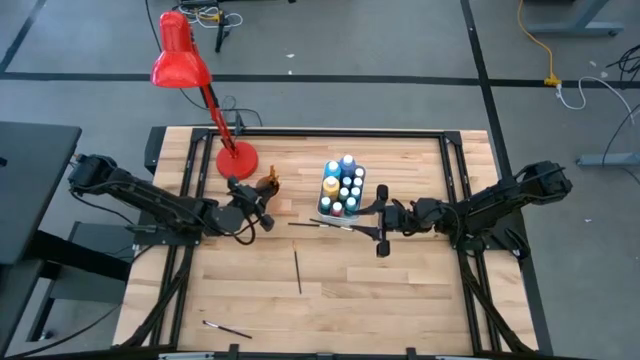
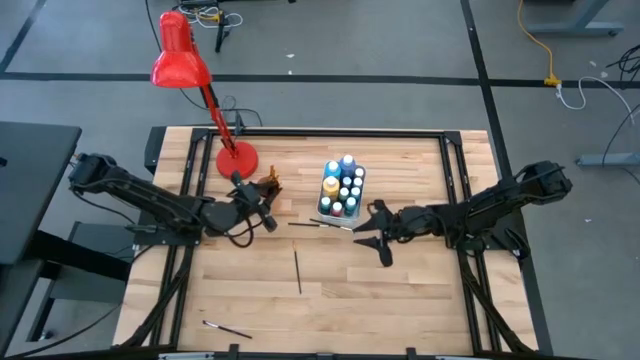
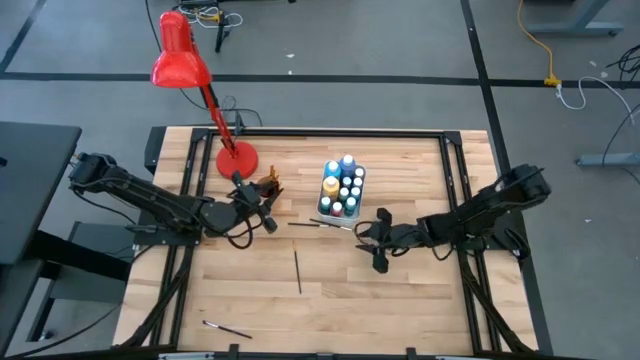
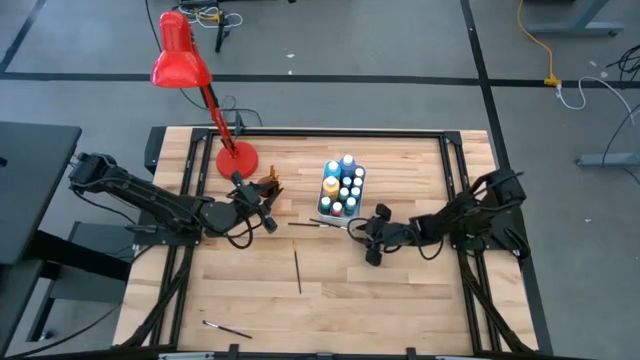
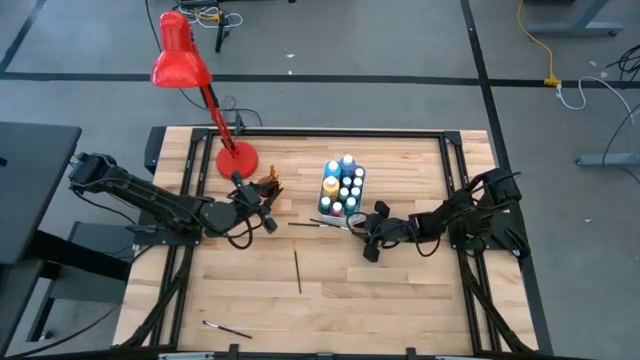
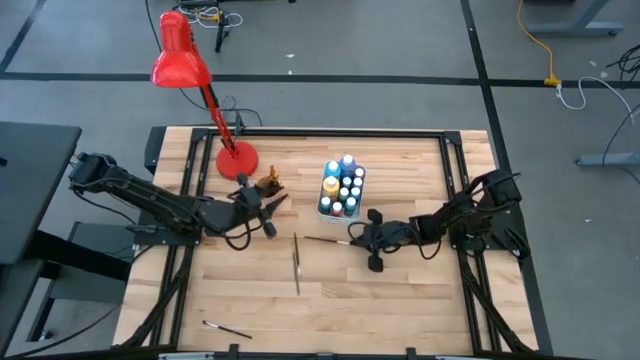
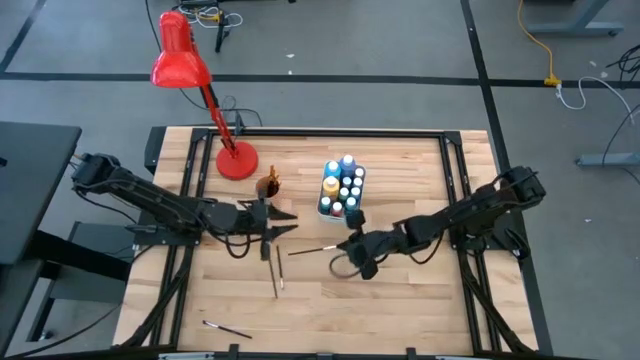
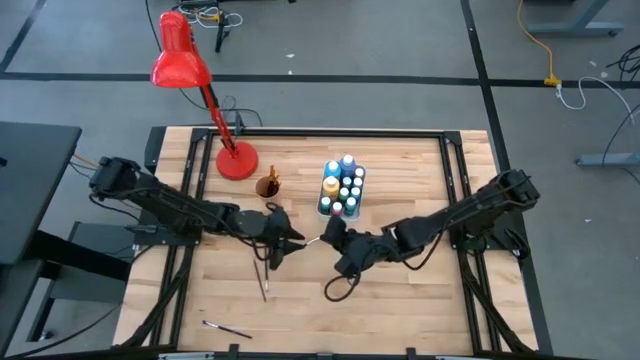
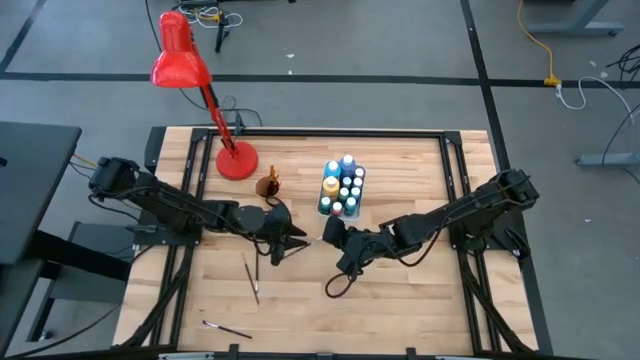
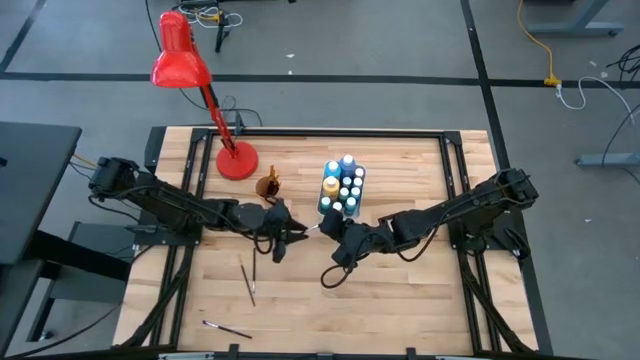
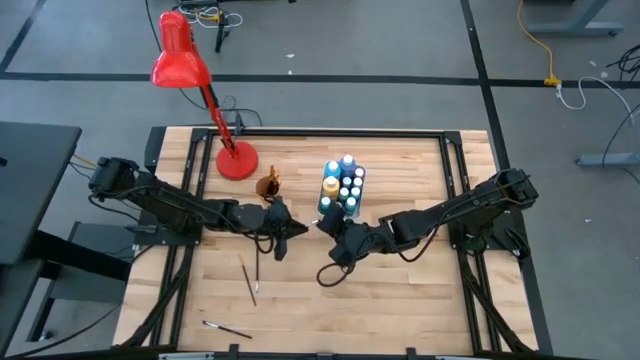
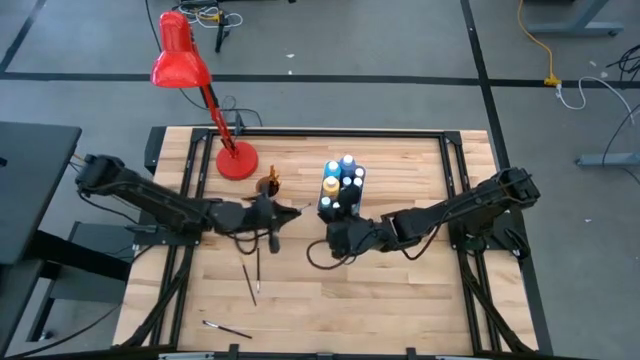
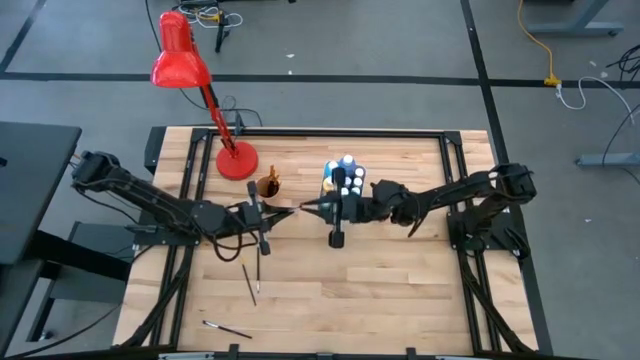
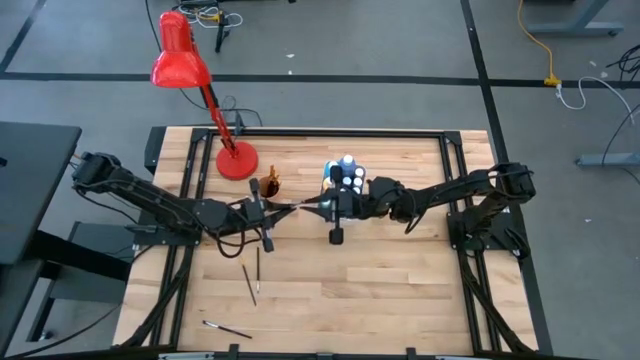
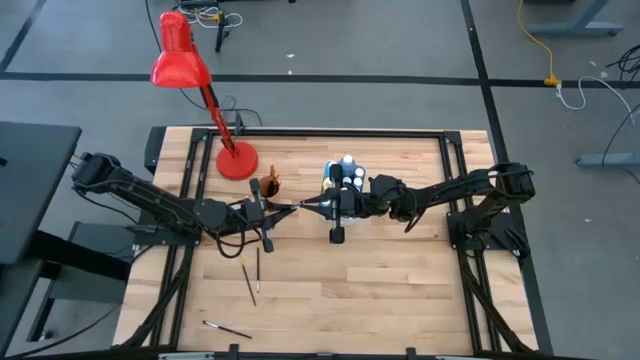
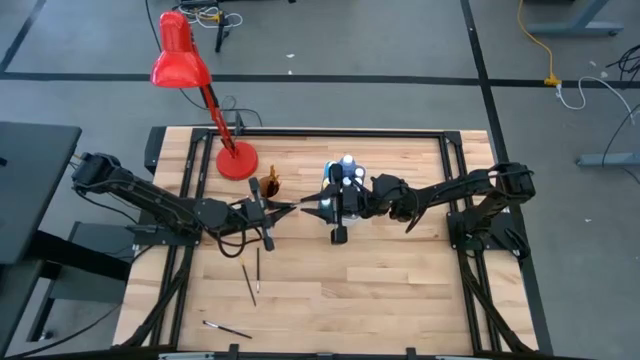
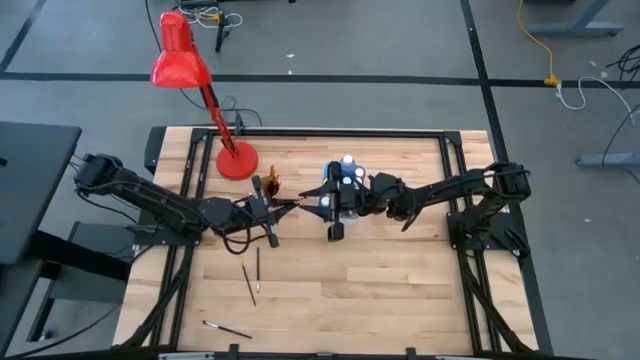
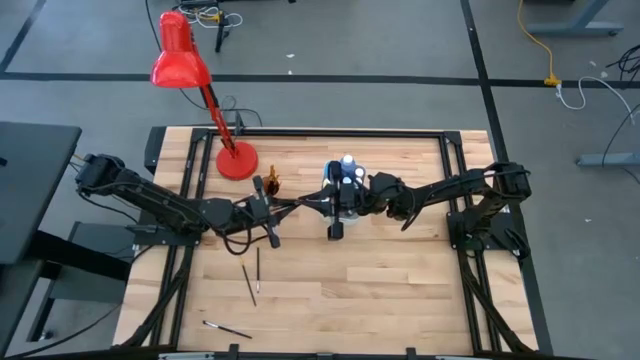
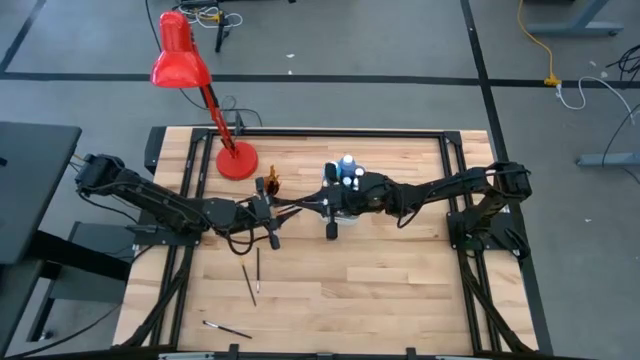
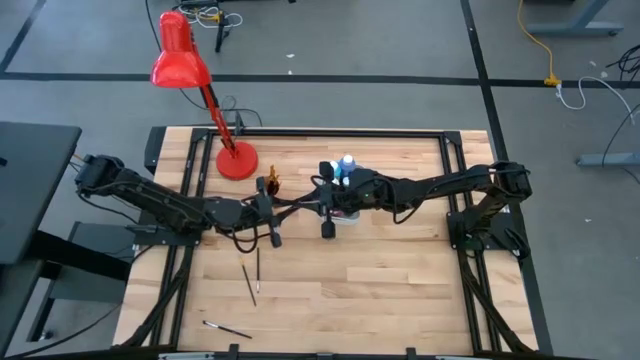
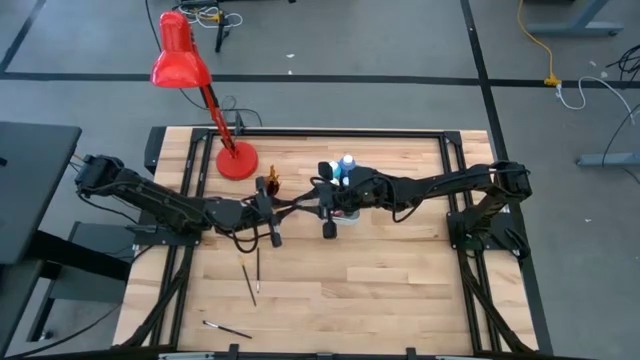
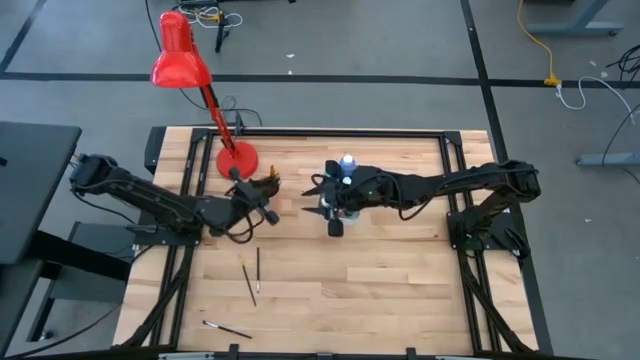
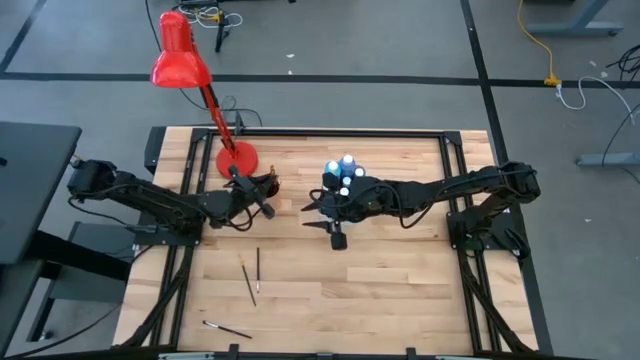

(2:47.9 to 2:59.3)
Task: Pick & Place Paint Supplies
Put the white paint brush into the orange cup

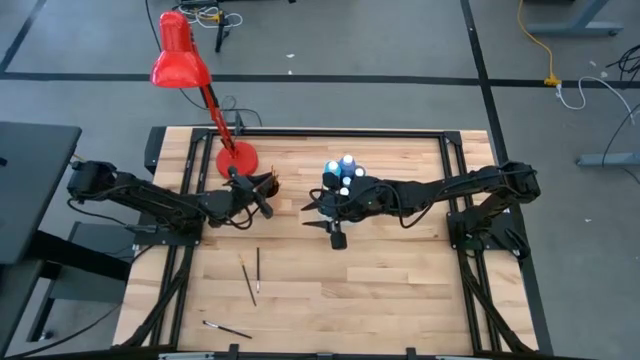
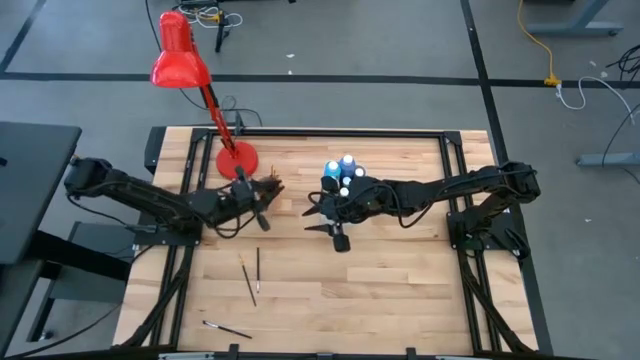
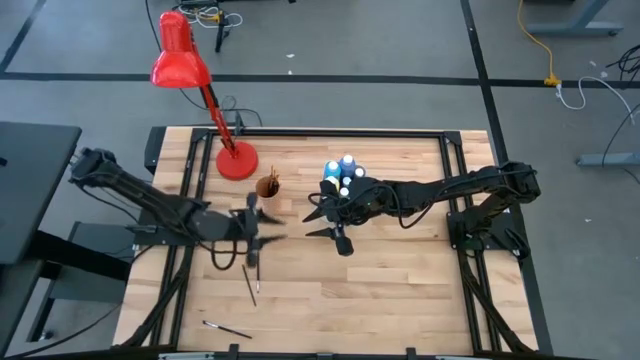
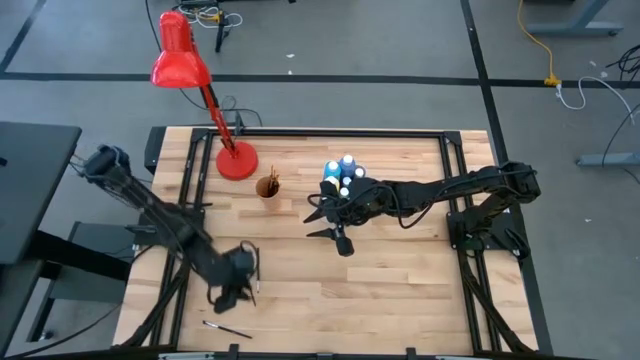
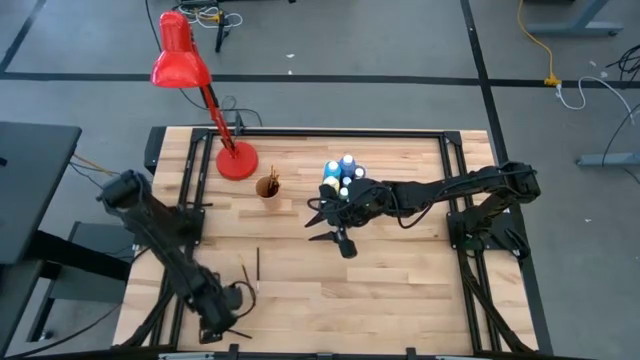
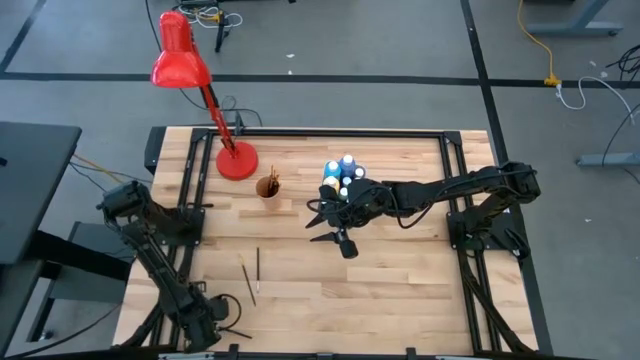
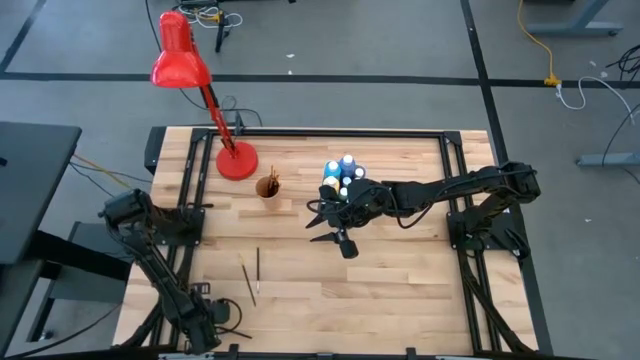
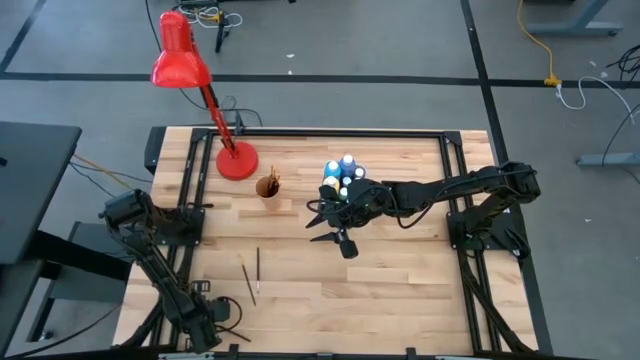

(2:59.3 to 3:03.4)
Put the white paint brush into the orange cup

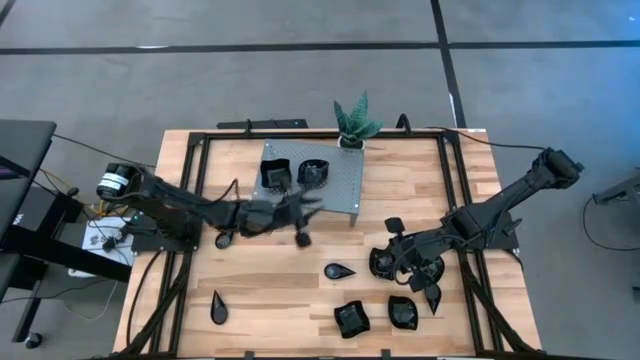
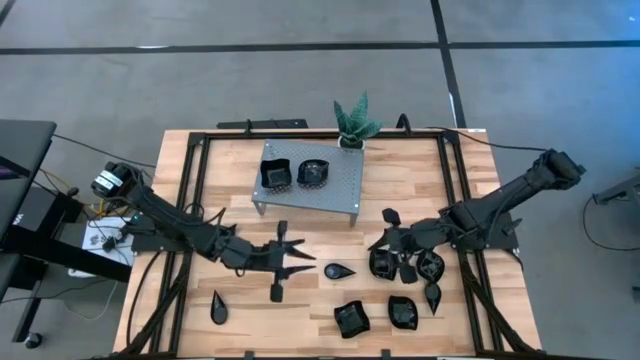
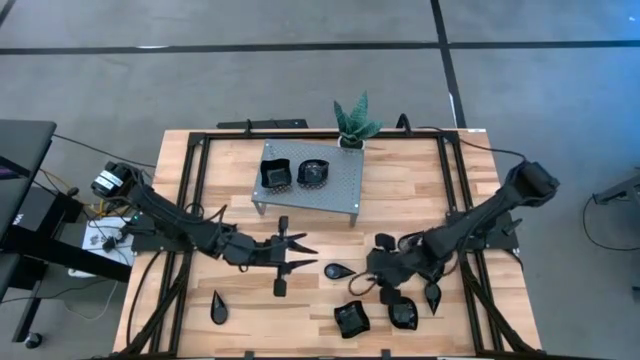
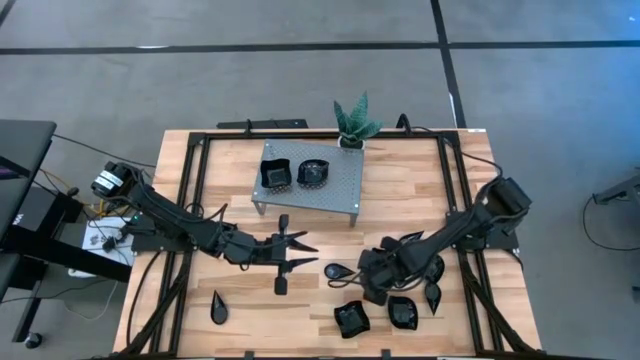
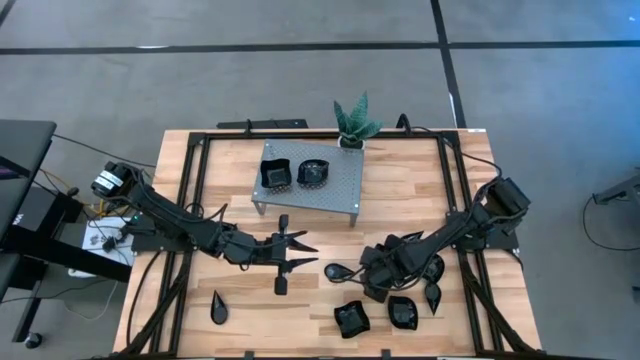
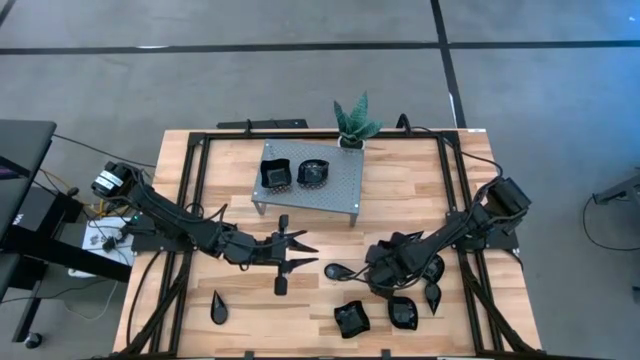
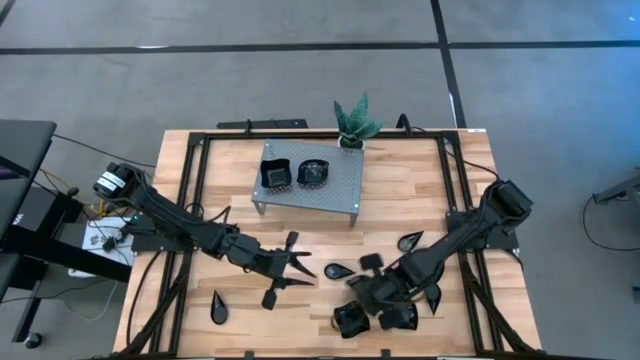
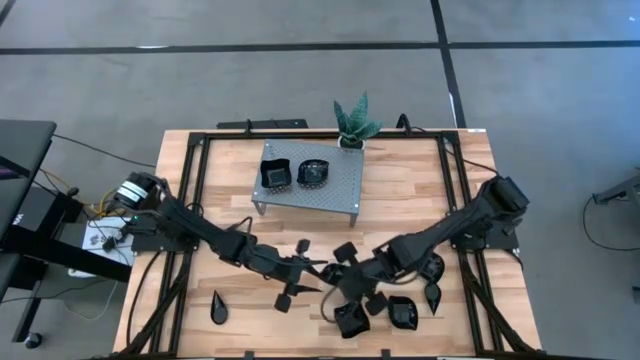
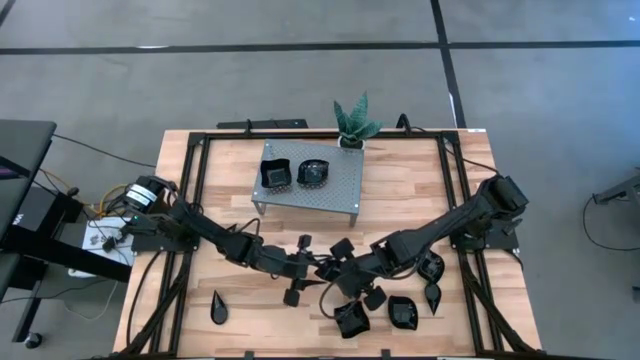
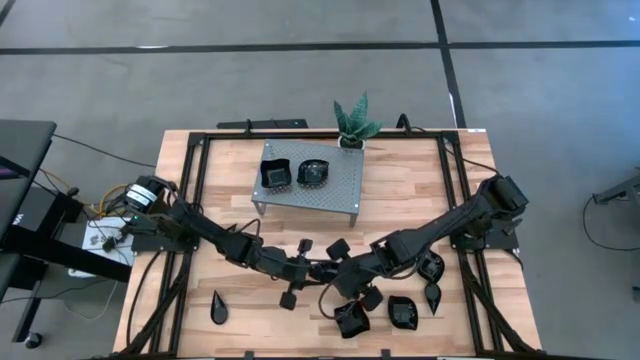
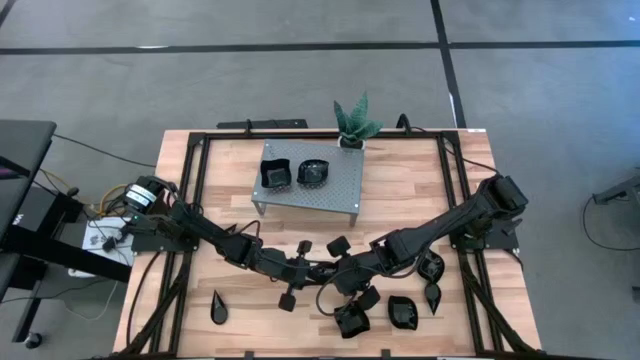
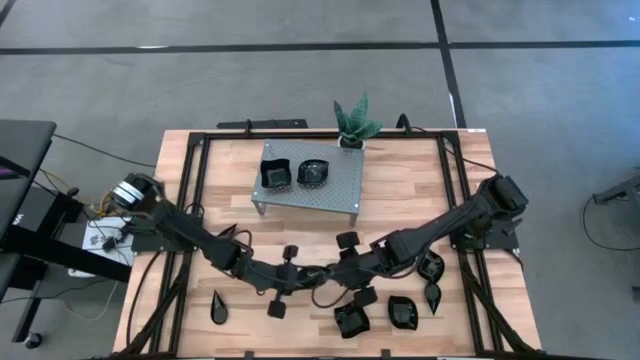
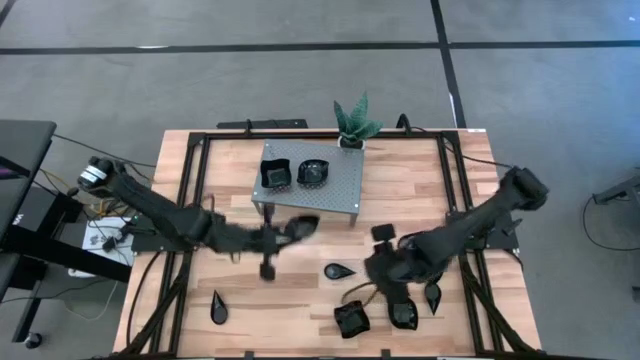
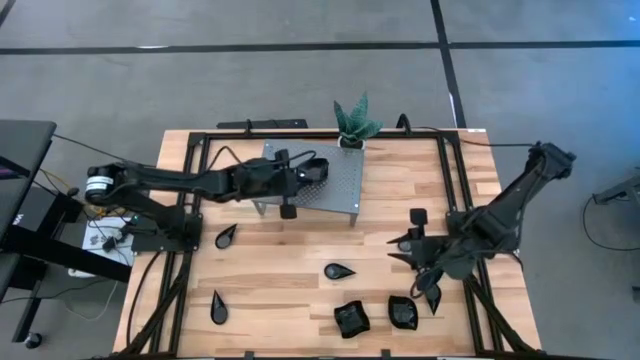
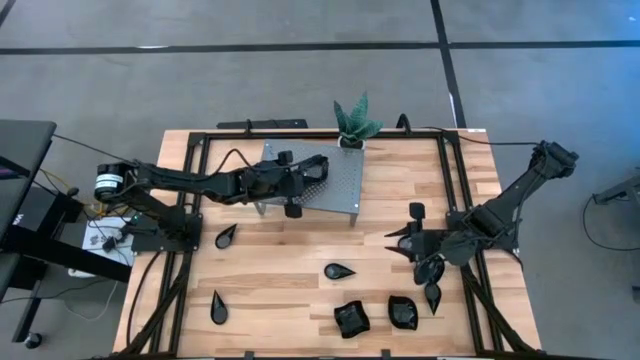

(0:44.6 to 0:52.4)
Task: Pick & Place Mini shaped plates
Stack the black leaf shaped plate on top of the stacked black leaf shaped plates on the shelf
